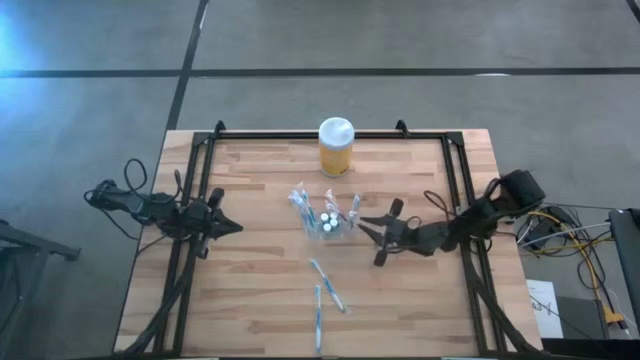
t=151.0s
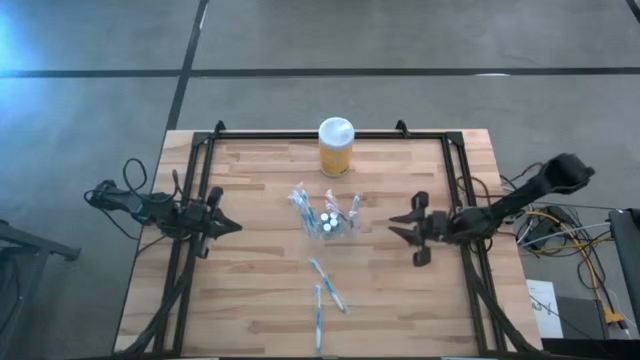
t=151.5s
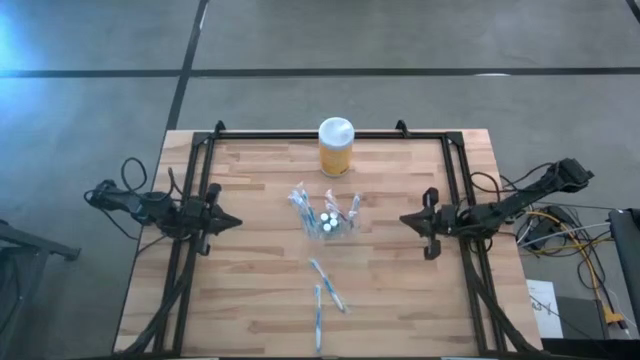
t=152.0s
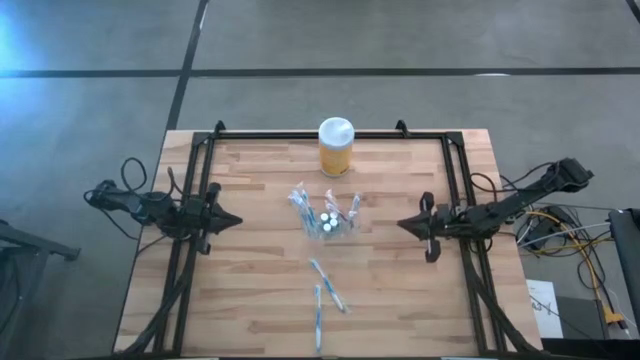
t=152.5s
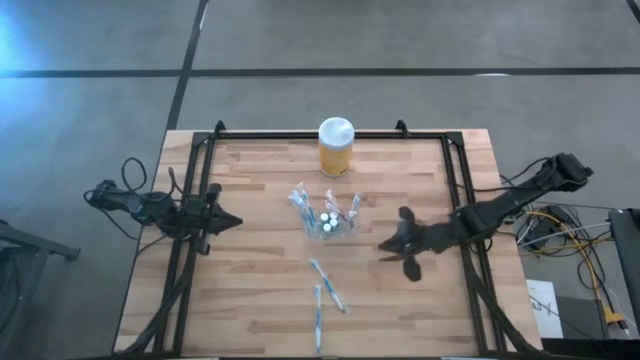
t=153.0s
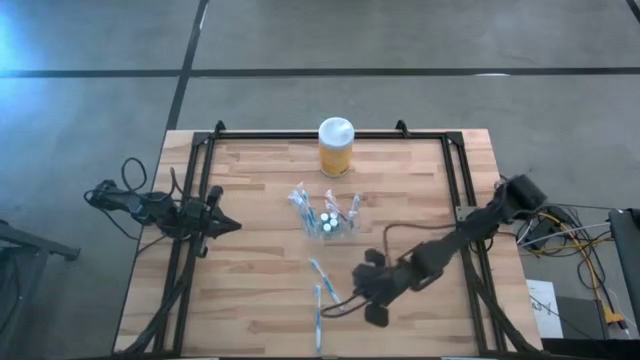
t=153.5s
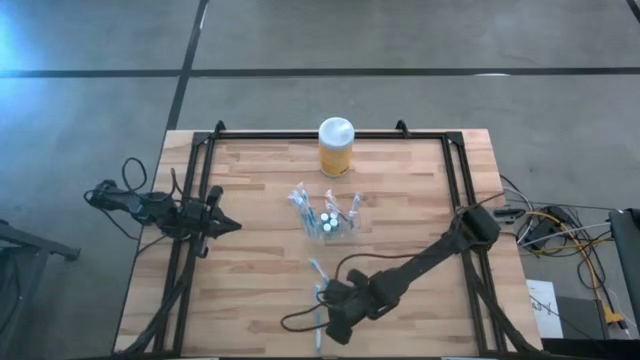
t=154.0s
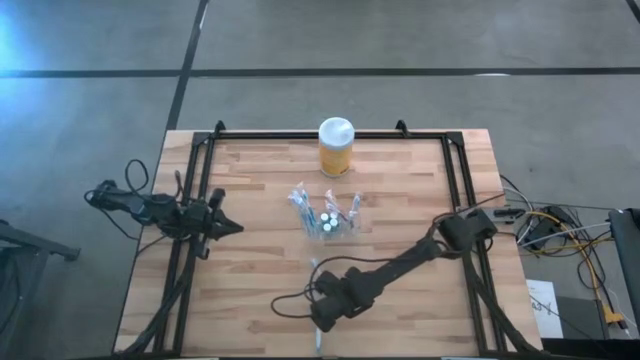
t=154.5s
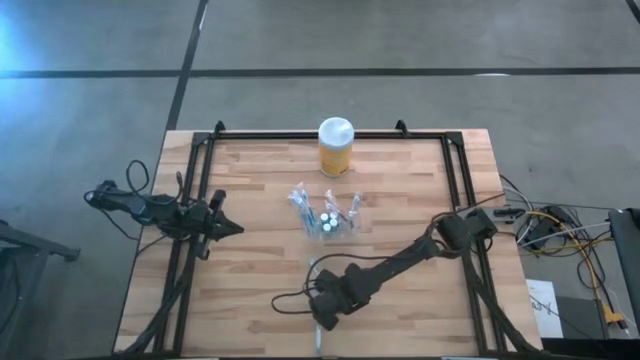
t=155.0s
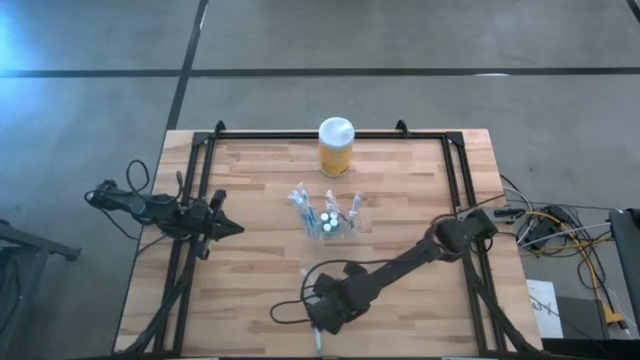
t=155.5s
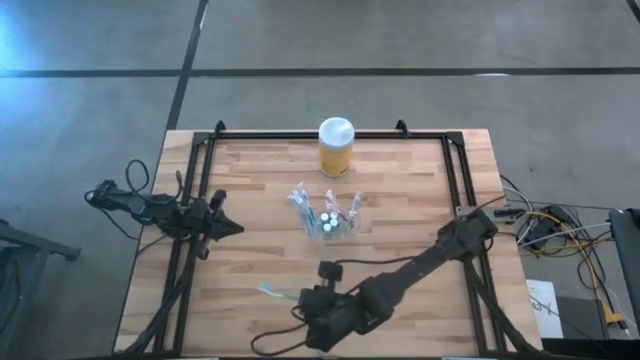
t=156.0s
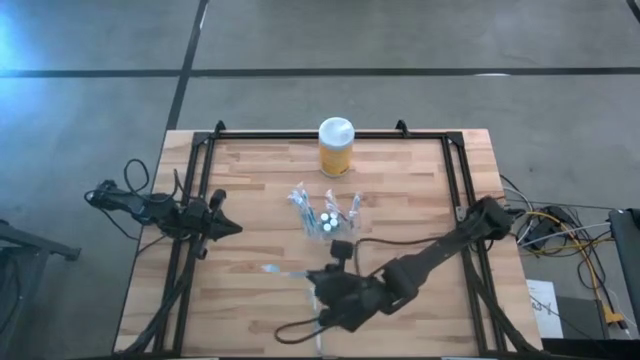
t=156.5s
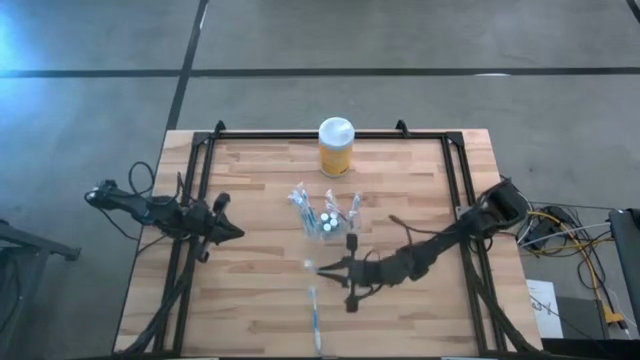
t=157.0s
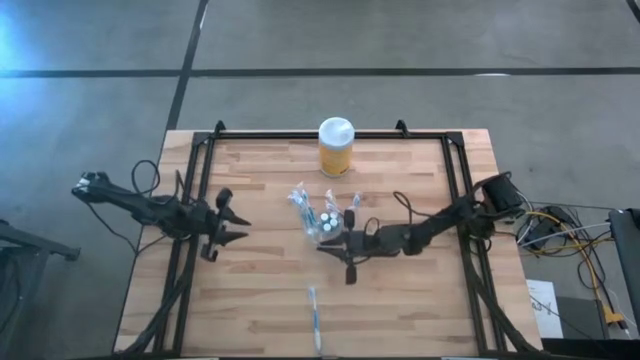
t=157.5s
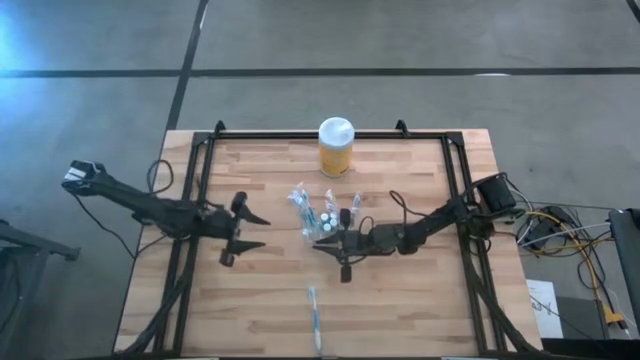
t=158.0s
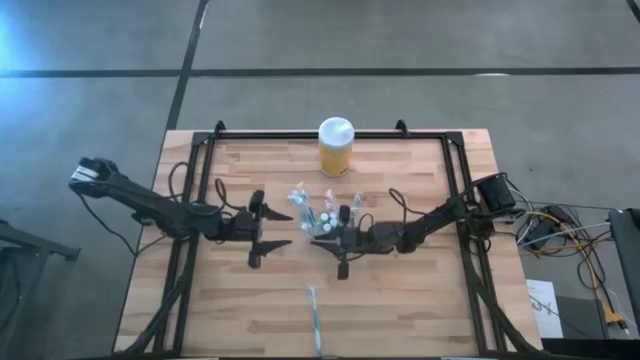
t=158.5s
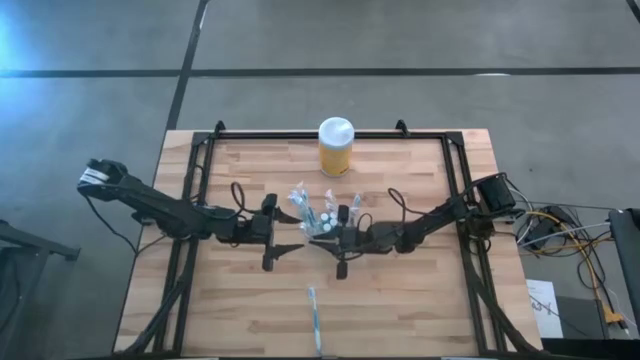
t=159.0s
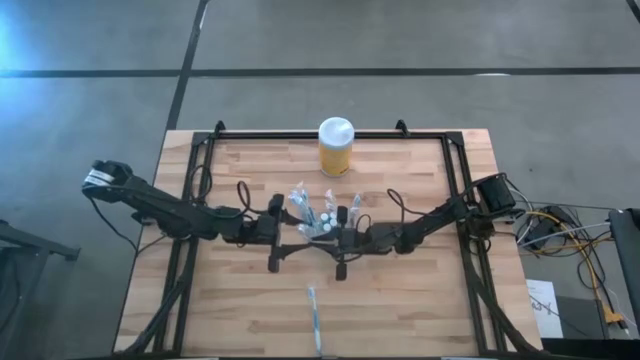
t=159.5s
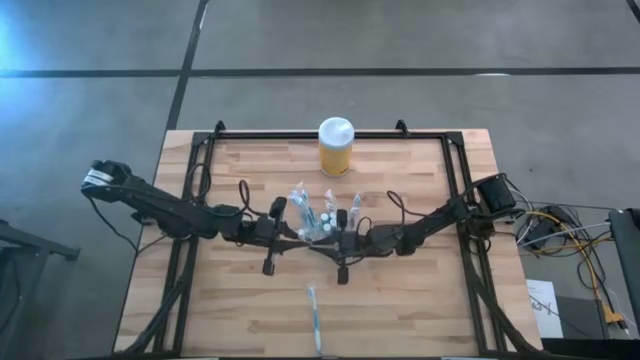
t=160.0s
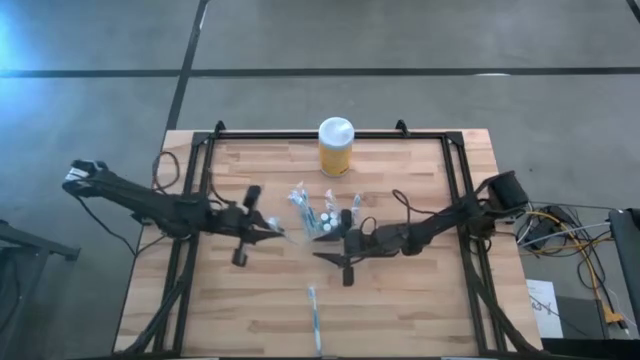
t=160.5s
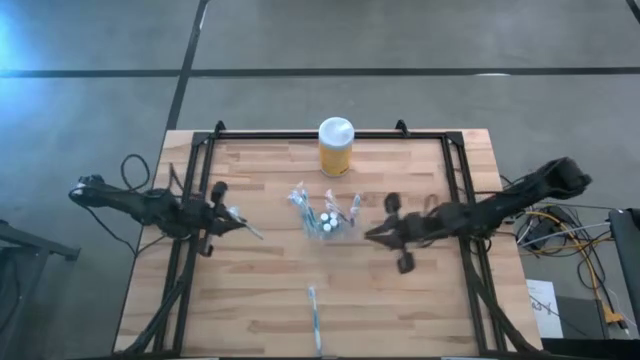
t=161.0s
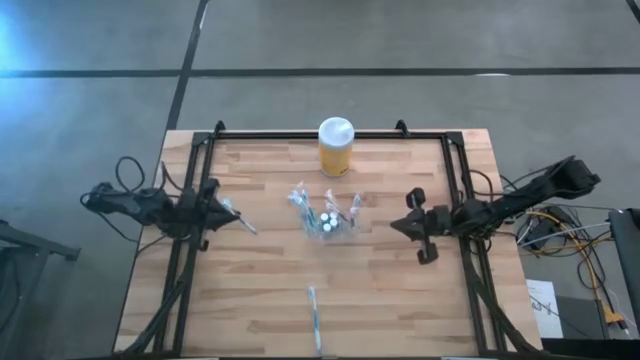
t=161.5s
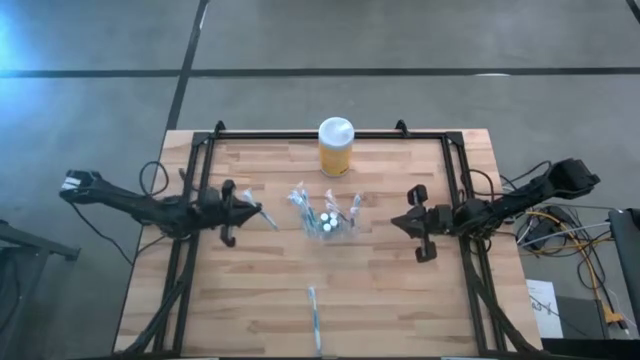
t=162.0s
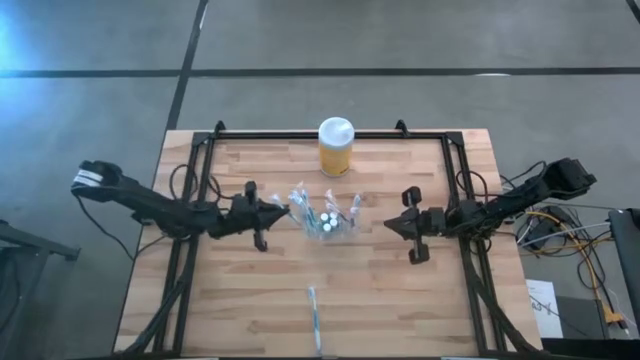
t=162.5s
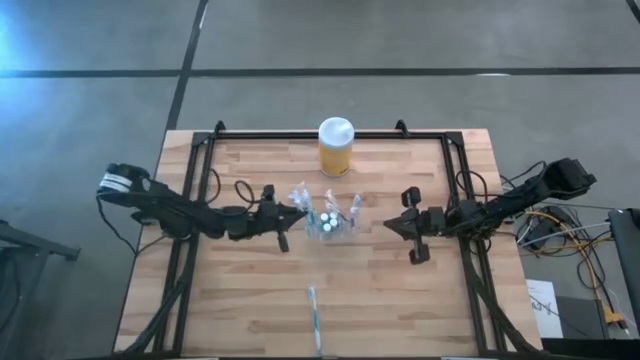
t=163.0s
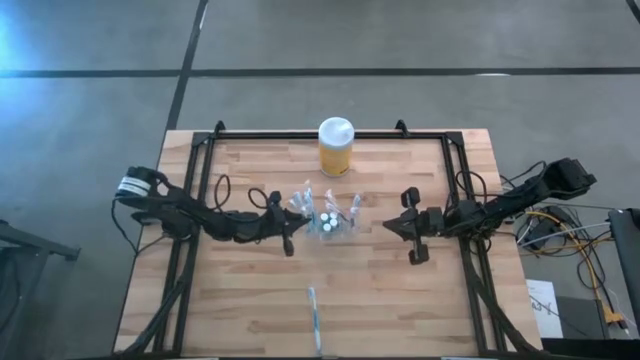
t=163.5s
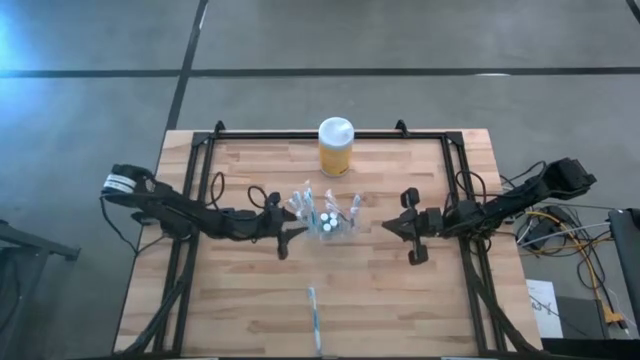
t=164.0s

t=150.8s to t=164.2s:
Task: Pick & Place toothbrushing station
Put the blue toothbrush into the transparent organizer

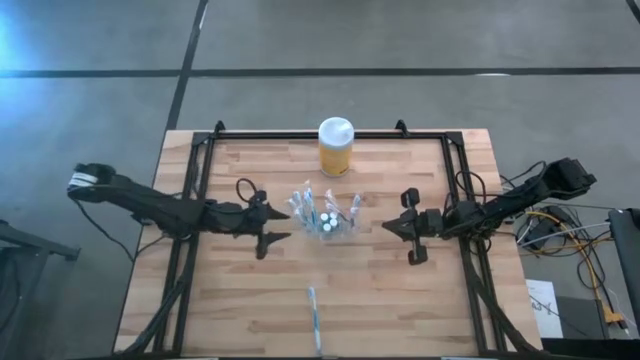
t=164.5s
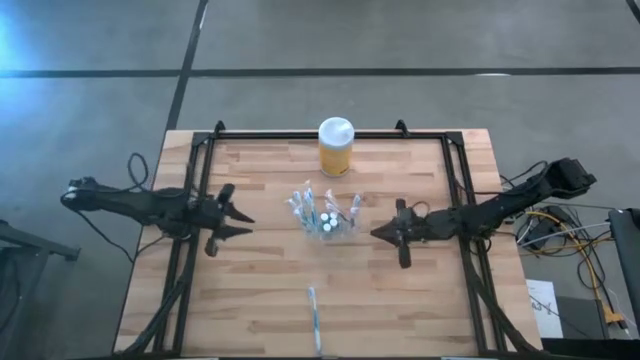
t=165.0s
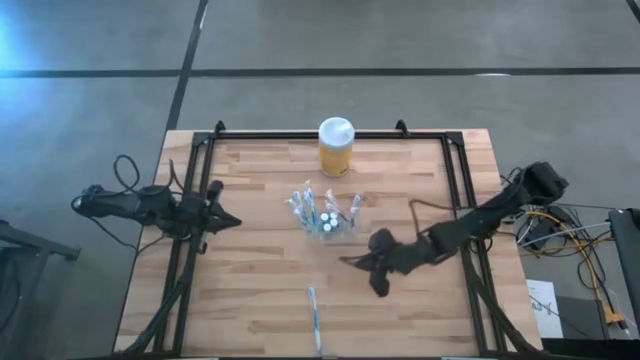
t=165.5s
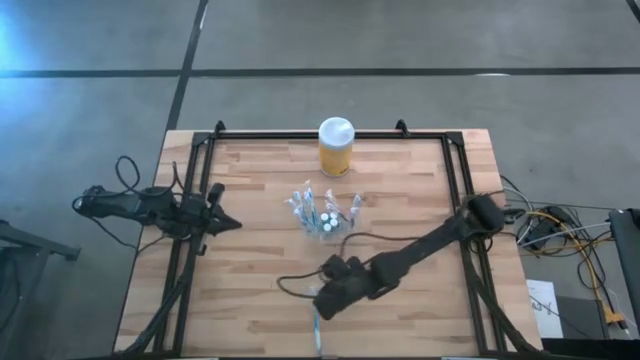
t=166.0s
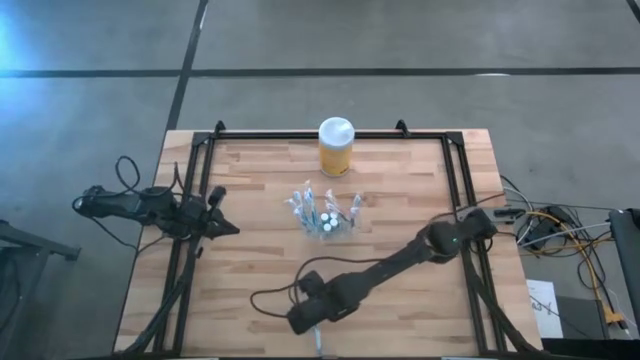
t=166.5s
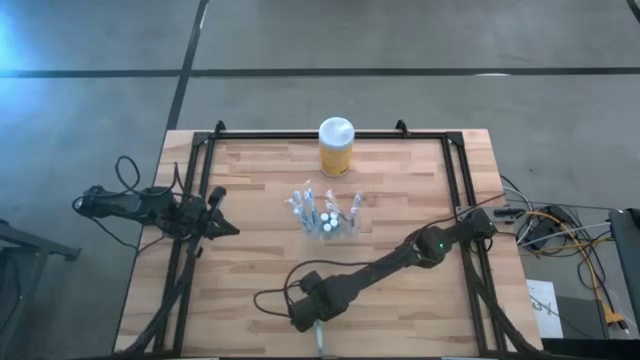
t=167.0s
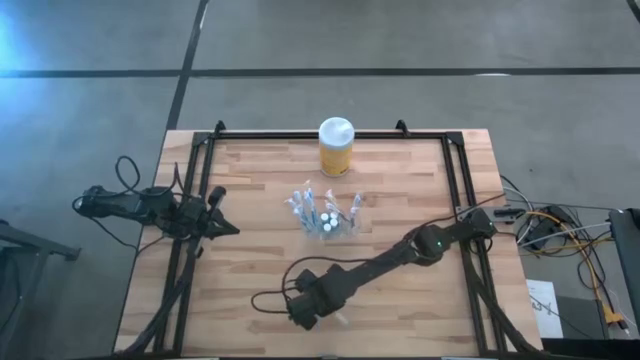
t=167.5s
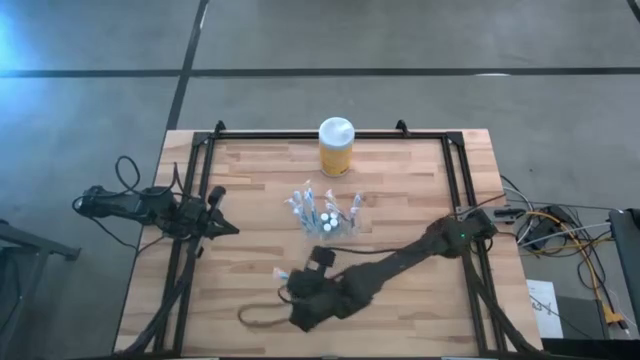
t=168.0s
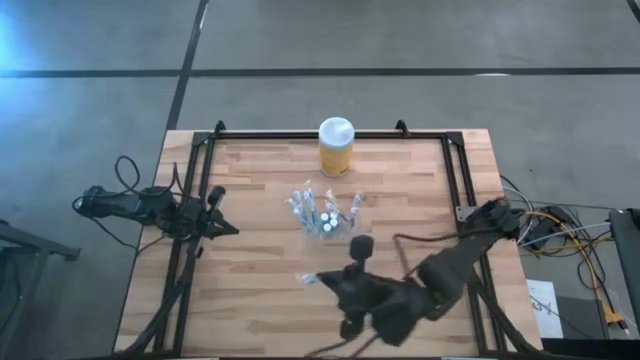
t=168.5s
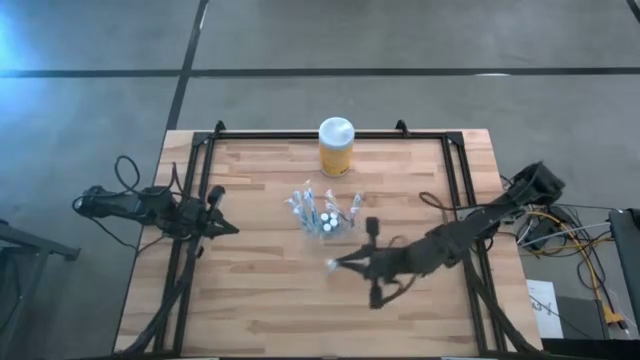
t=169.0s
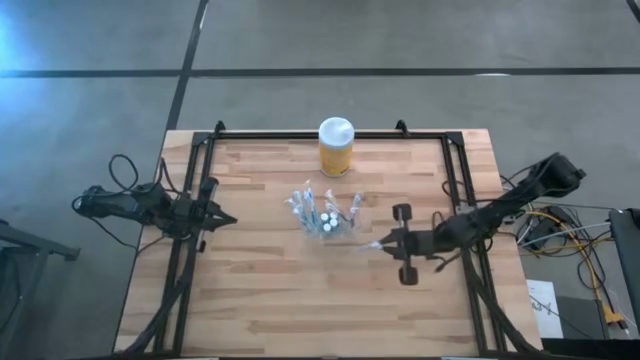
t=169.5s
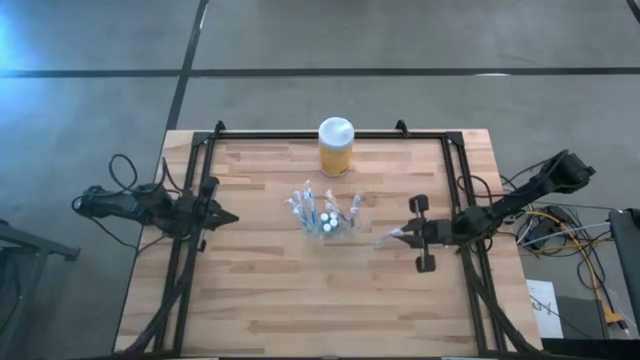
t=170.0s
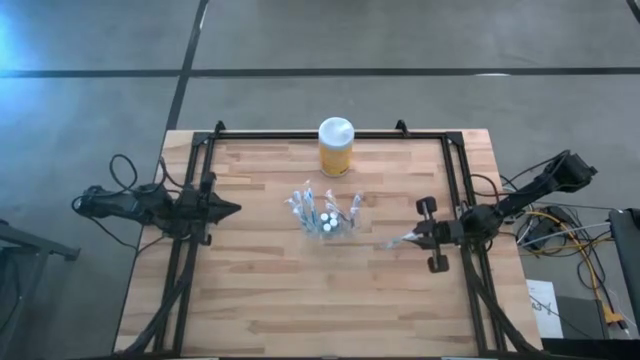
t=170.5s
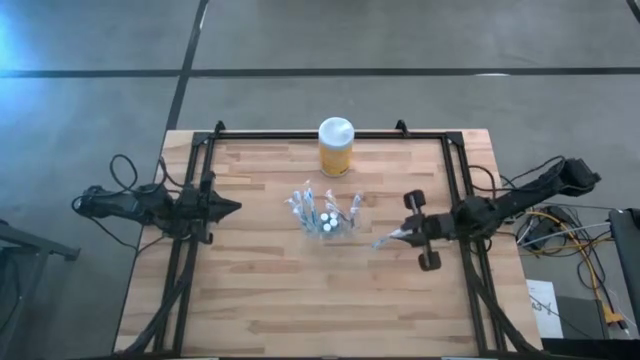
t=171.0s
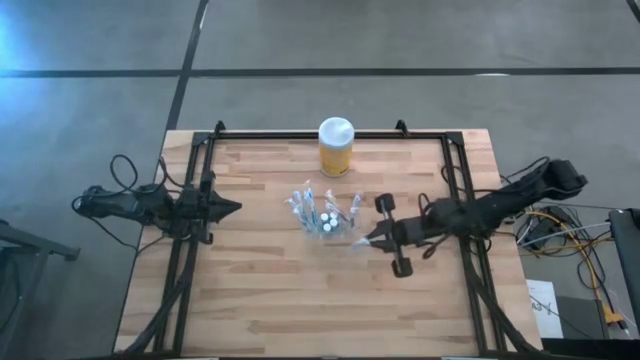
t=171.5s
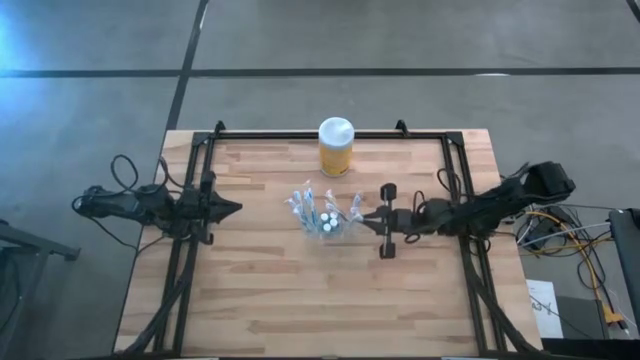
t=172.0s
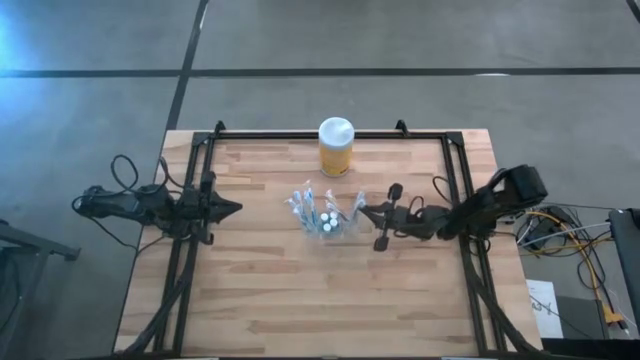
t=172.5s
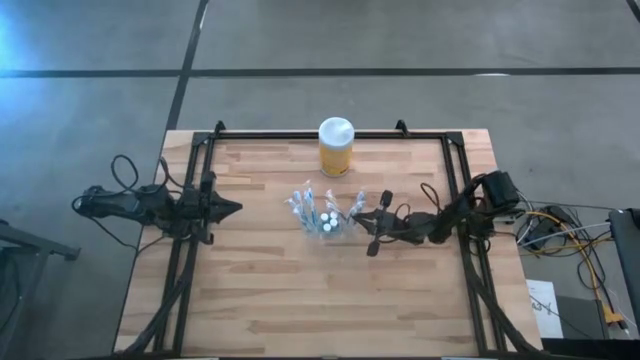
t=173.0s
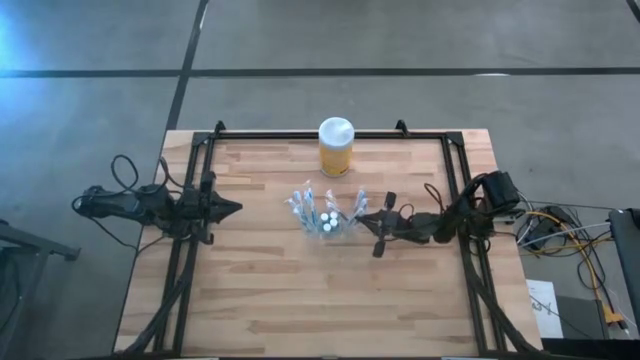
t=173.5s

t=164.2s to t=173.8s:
Put the blue toothbrush into the transparent organizer
